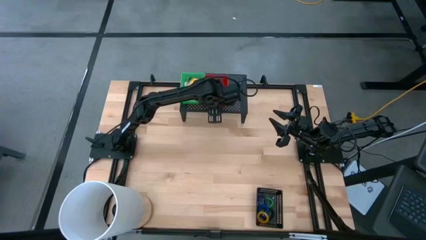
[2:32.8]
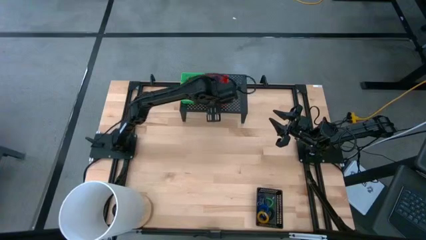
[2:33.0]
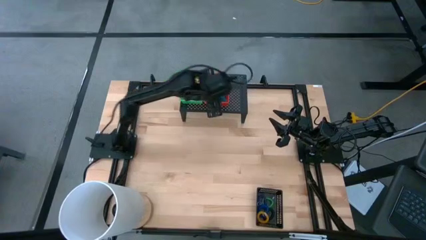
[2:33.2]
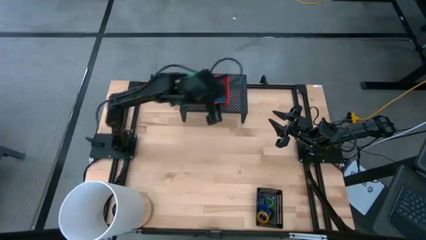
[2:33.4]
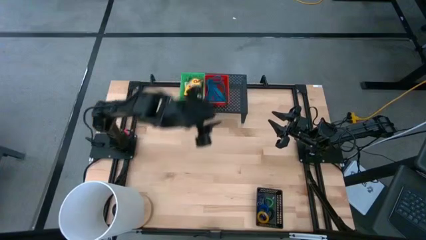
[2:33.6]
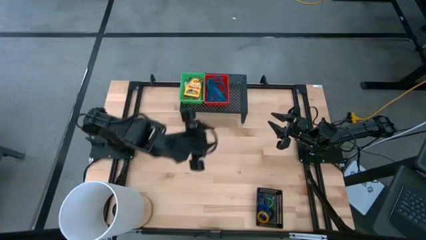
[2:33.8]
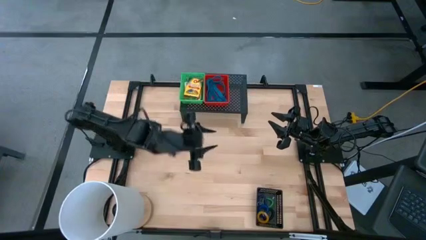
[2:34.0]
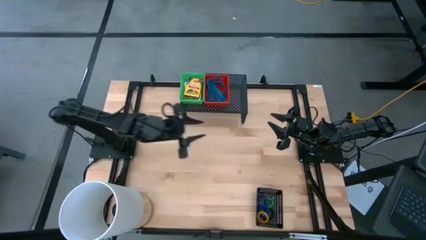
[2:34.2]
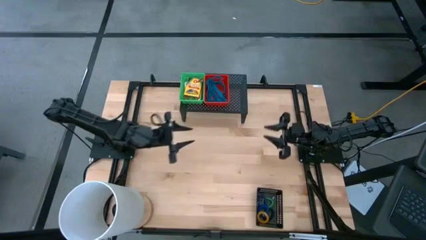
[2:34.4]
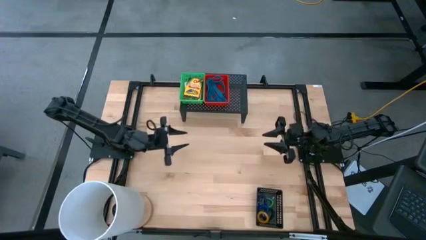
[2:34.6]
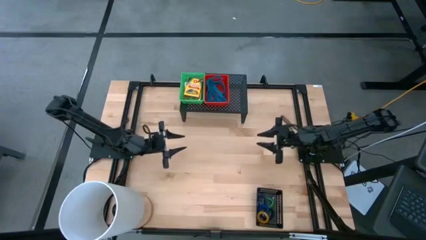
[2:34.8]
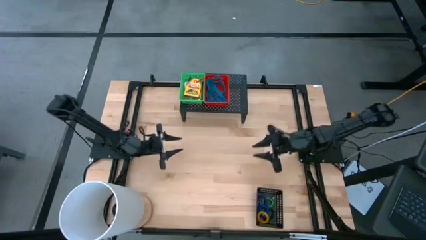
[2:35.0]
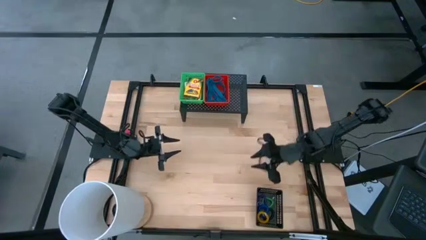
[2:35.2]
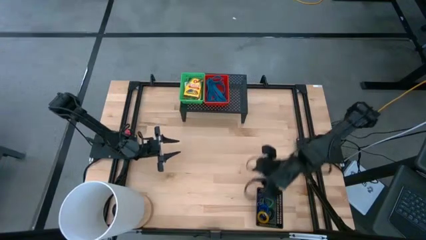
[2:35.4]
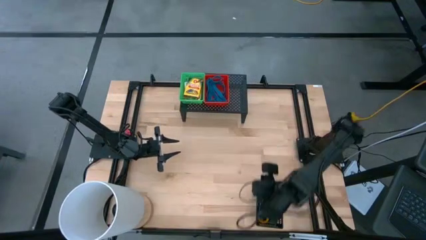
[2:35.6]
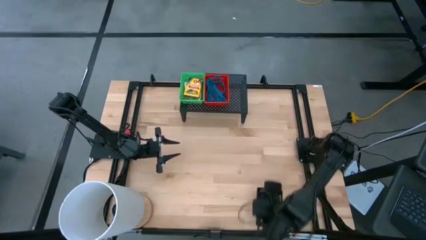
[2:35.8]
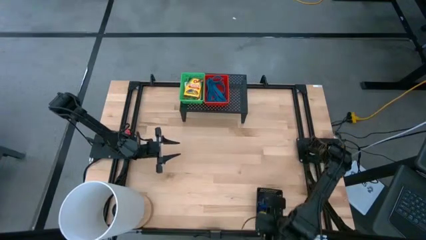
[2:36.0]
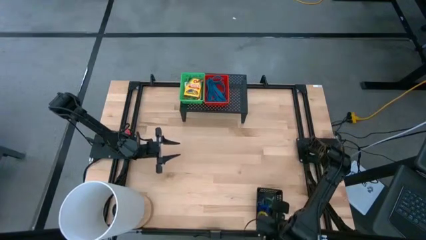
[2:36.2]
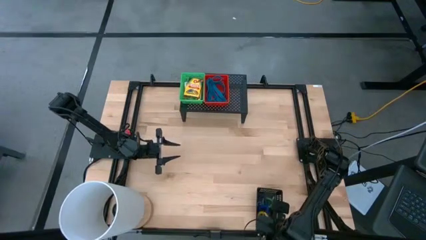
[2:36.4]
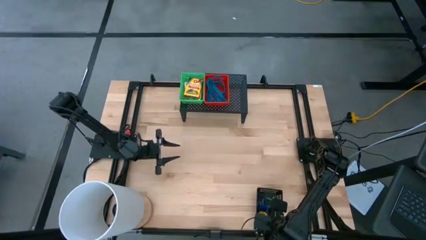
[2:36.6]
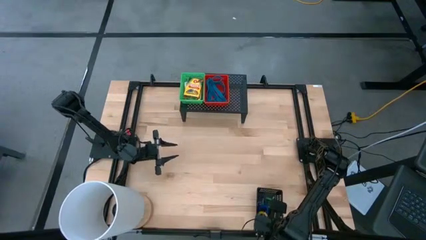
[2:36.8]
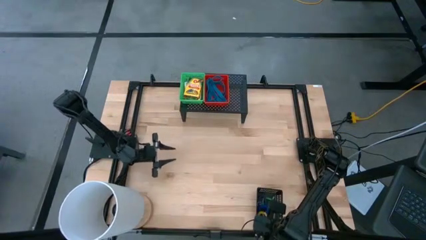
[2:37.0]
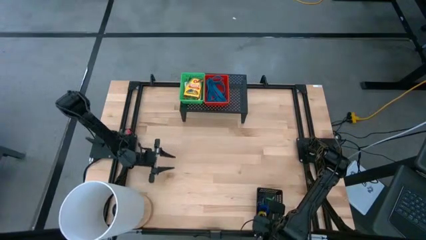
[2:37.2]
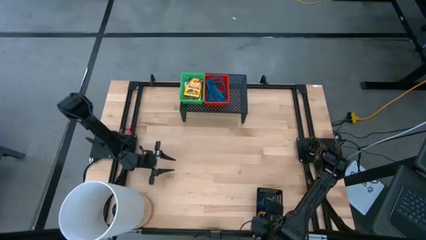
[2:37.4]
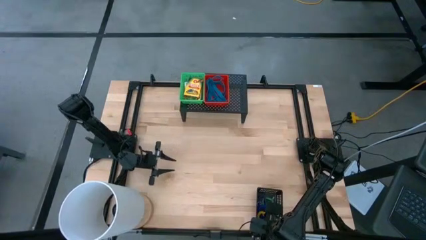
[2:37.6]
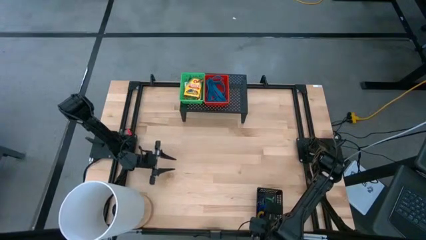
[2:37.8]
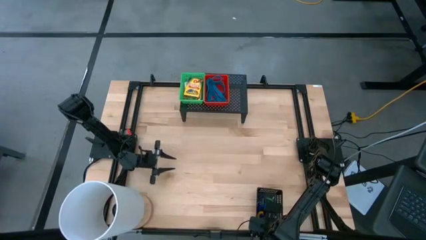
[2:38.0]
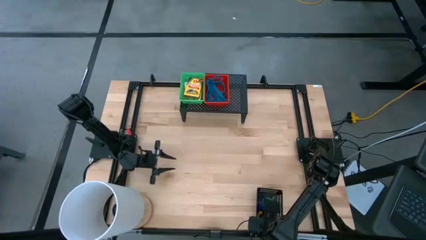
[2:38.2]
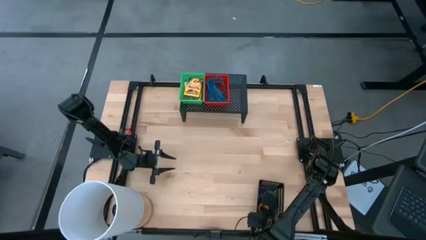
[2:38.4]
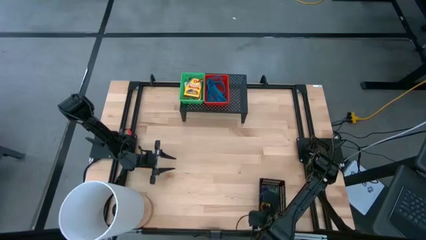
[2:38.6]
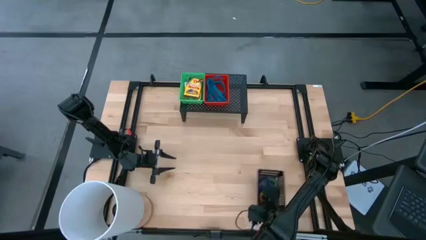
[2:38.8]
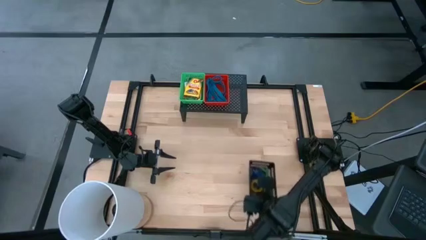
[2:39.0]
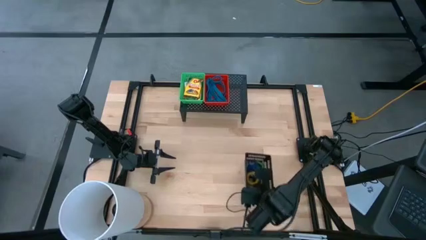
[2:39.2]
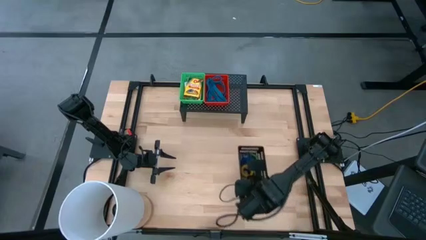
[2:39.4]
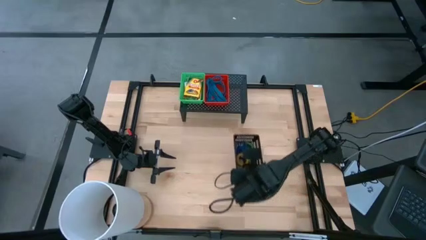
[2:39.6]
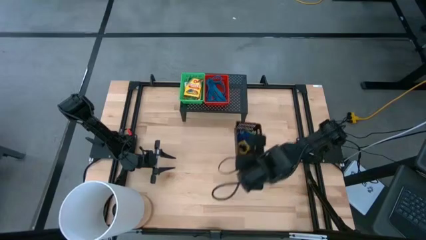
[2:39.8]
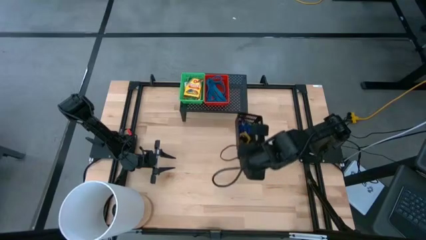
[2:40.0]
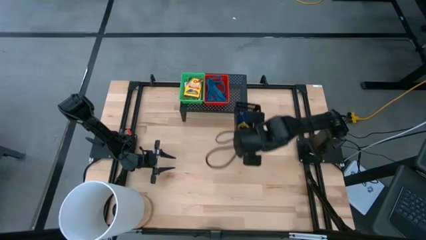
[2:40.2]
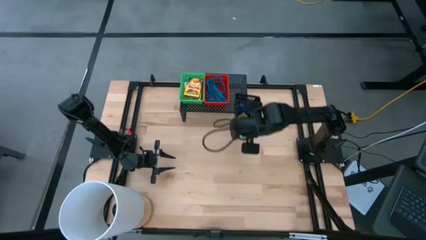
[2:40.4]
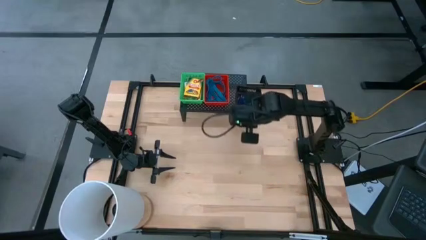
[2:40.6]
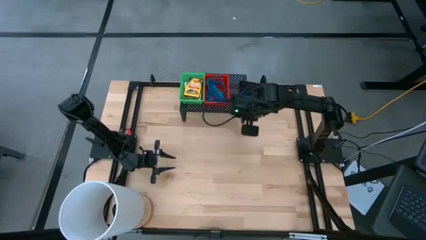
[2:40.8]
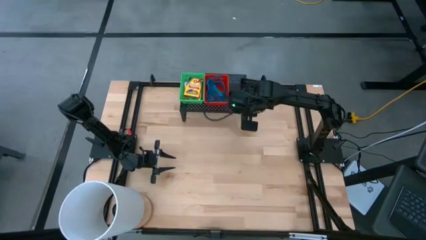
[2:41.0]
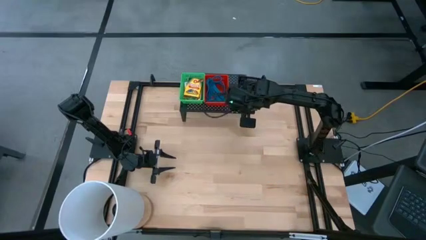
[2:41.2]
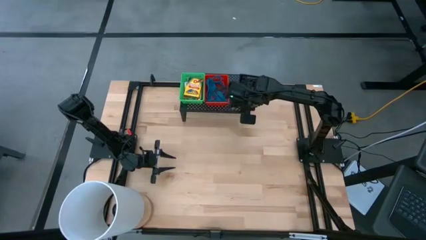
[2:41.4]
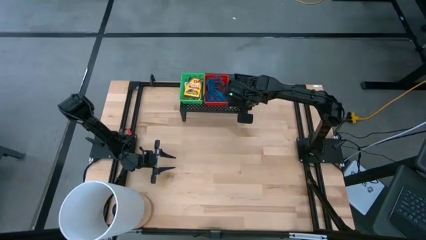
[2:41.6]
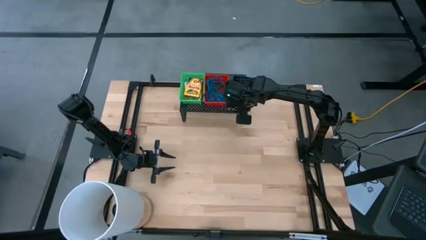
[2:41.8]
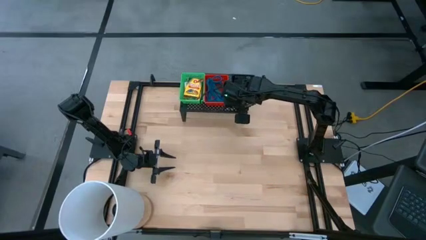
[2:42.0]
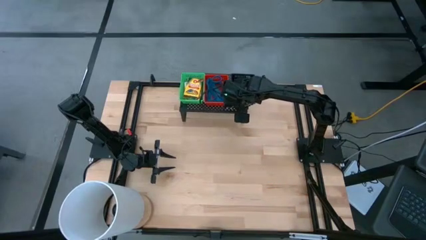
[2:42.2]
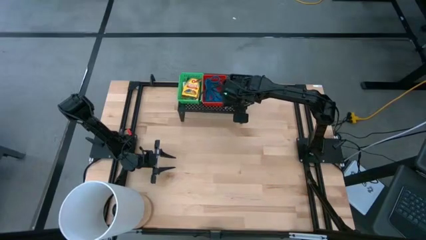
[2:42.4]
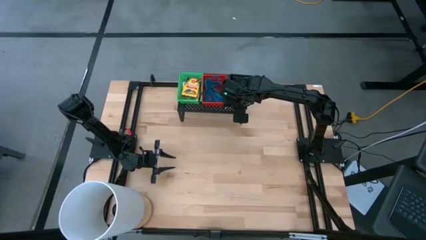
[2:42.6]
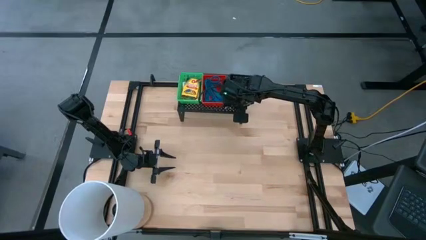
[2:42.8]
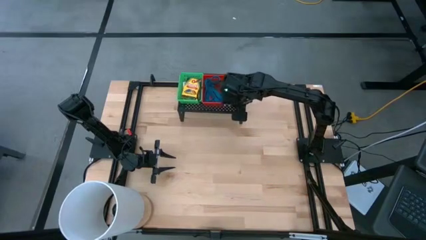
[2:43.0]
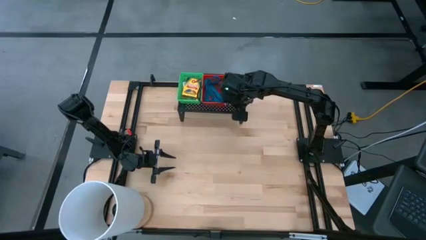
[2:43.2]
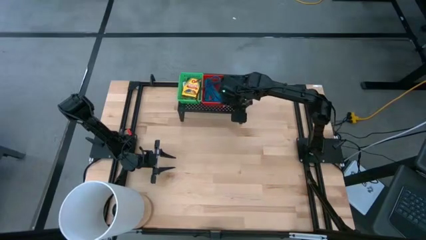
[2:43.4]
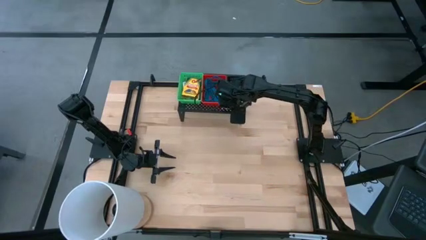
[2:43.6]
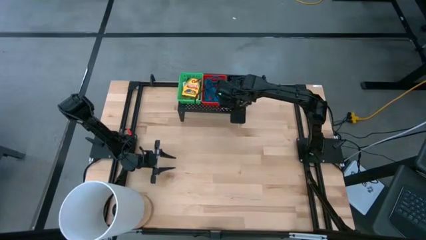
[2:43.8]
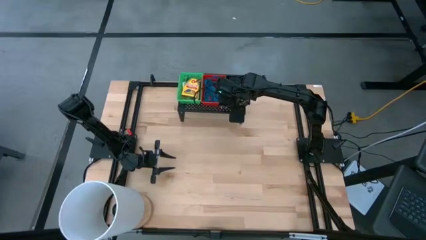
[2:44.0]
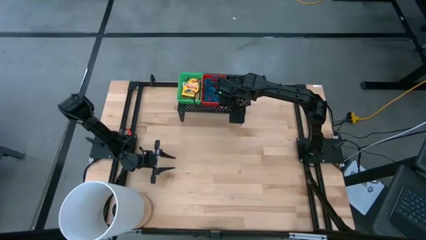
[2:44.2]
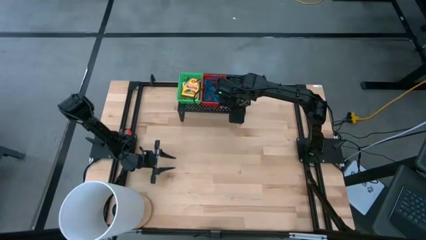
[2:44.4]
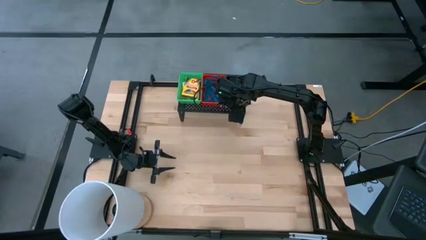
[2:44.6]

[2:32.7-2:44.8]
Task: Pick & Place Office Desk Supplies
Put the black bin on the shelf
